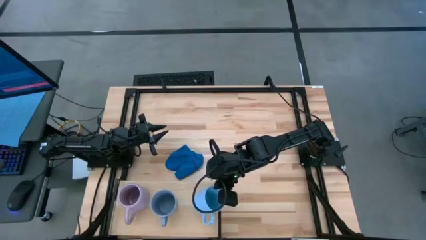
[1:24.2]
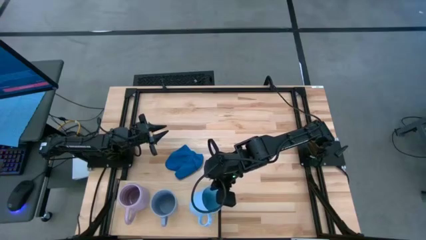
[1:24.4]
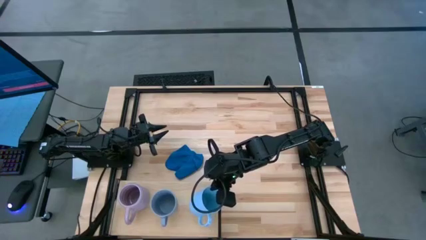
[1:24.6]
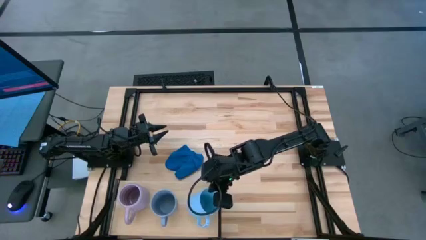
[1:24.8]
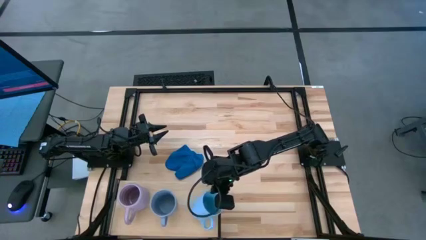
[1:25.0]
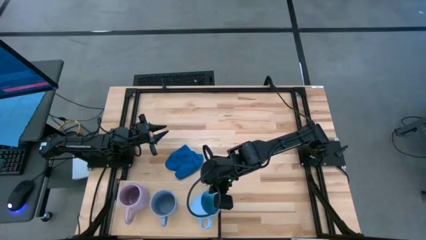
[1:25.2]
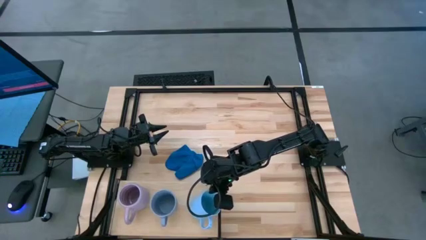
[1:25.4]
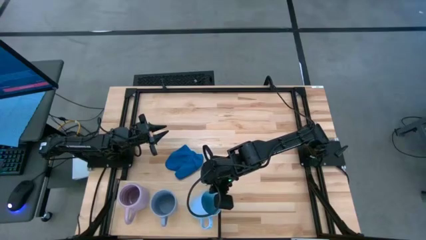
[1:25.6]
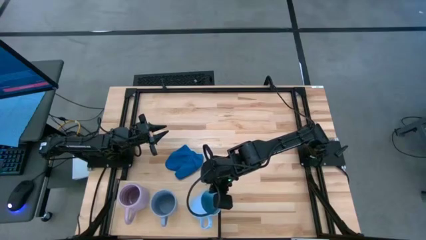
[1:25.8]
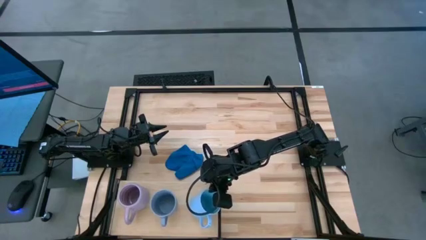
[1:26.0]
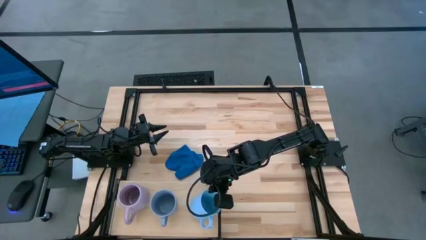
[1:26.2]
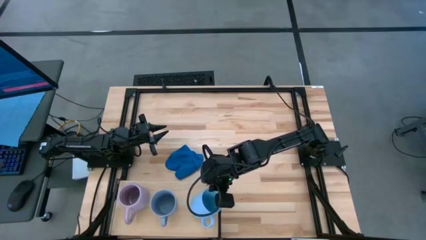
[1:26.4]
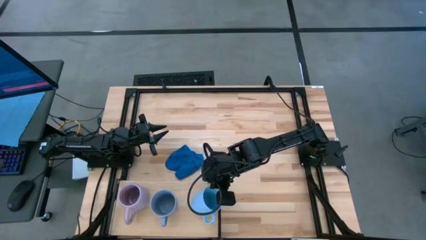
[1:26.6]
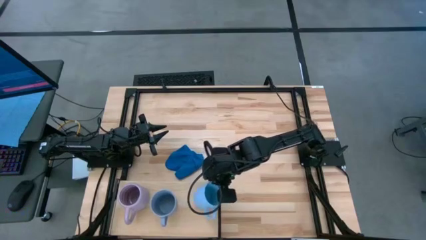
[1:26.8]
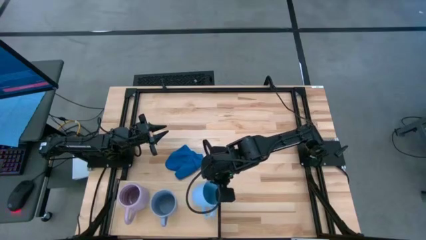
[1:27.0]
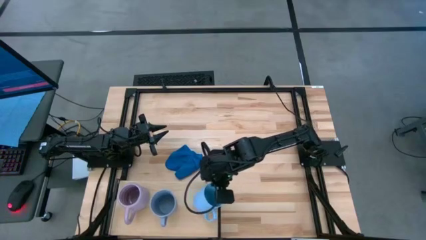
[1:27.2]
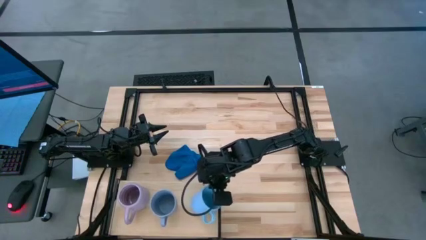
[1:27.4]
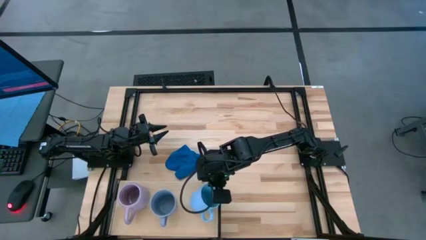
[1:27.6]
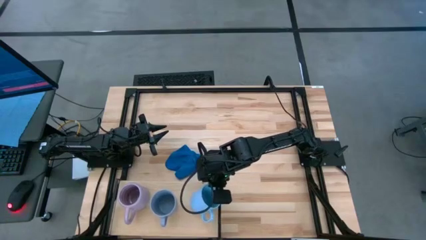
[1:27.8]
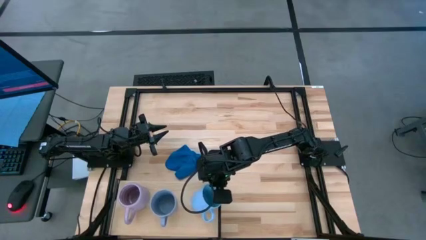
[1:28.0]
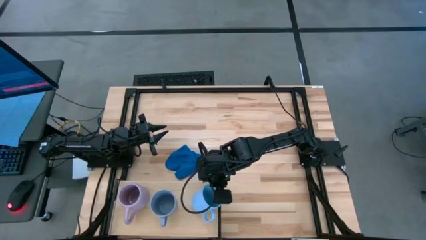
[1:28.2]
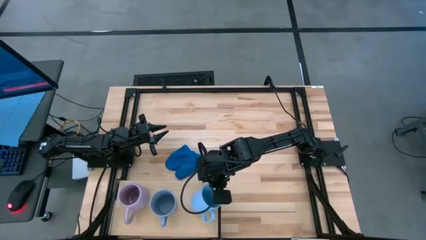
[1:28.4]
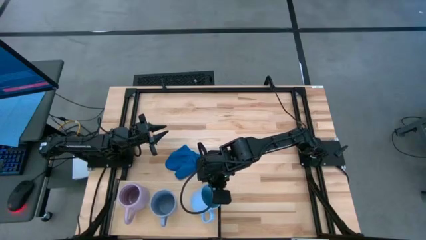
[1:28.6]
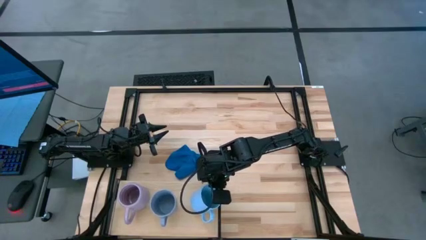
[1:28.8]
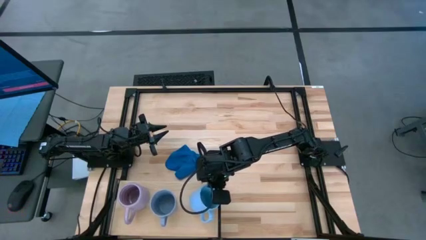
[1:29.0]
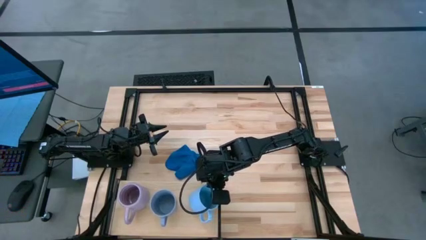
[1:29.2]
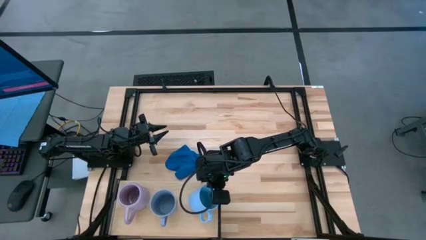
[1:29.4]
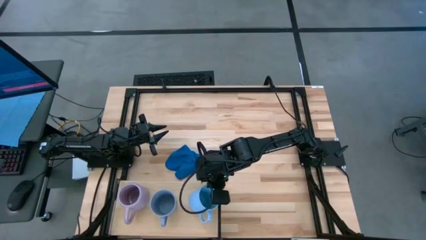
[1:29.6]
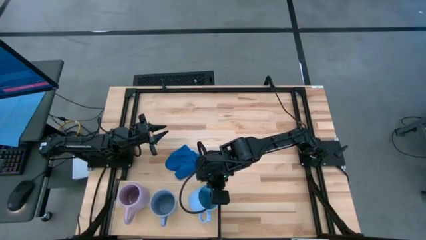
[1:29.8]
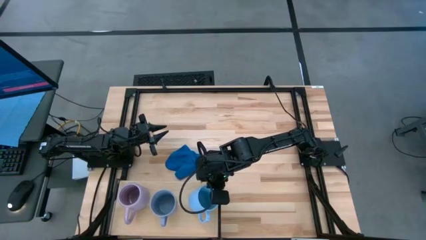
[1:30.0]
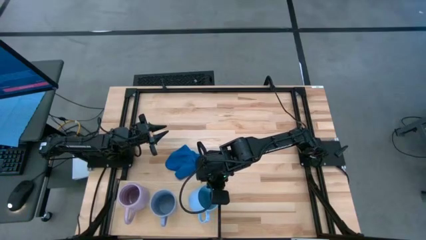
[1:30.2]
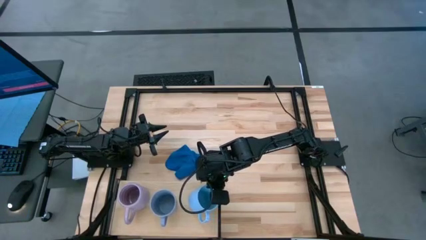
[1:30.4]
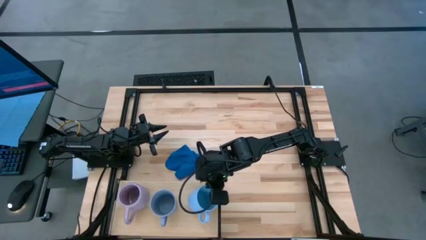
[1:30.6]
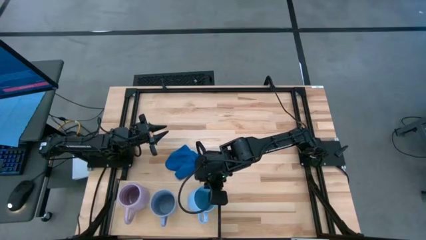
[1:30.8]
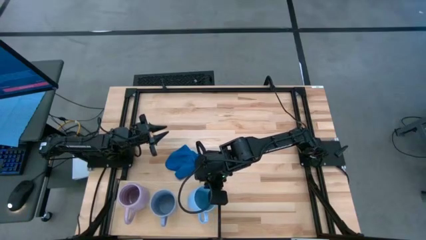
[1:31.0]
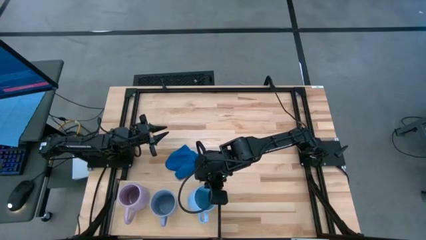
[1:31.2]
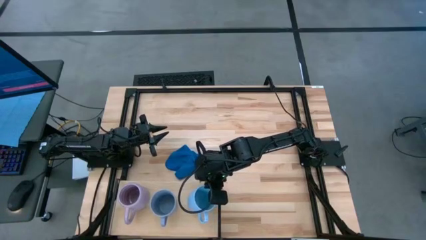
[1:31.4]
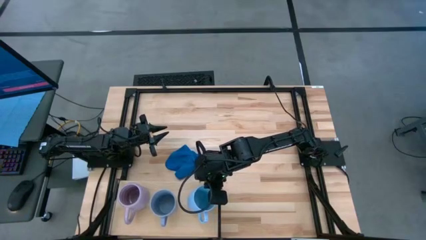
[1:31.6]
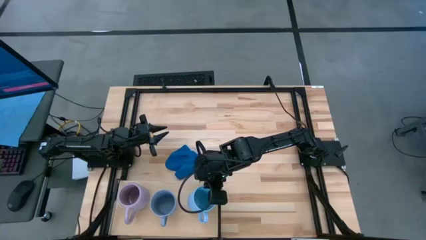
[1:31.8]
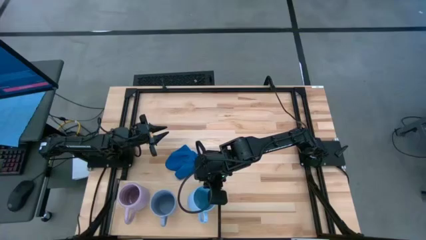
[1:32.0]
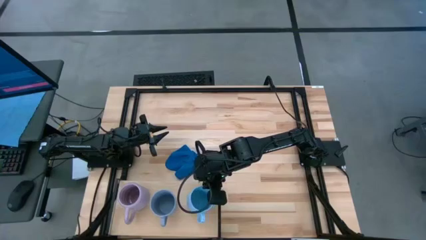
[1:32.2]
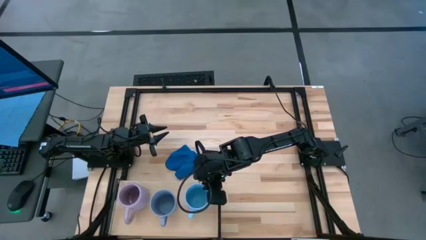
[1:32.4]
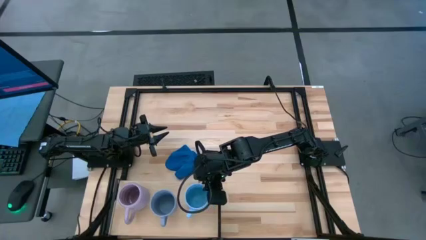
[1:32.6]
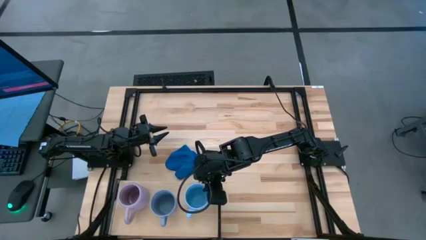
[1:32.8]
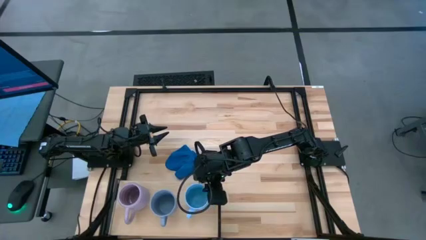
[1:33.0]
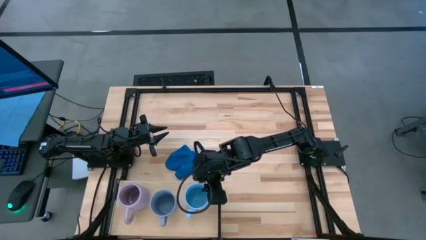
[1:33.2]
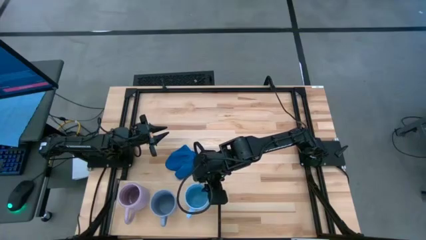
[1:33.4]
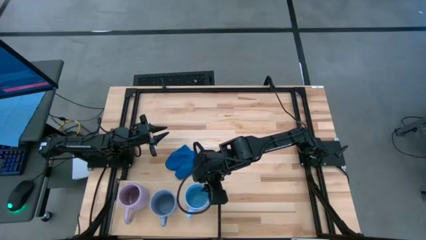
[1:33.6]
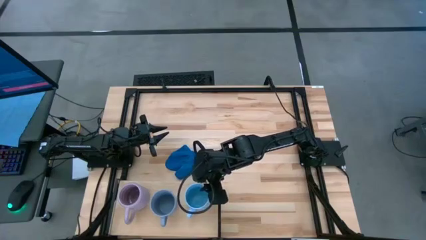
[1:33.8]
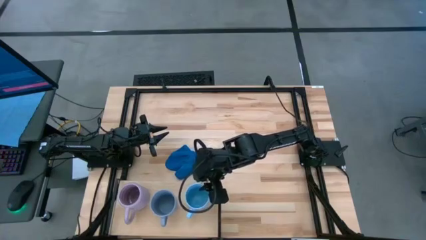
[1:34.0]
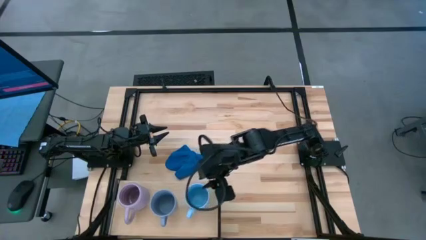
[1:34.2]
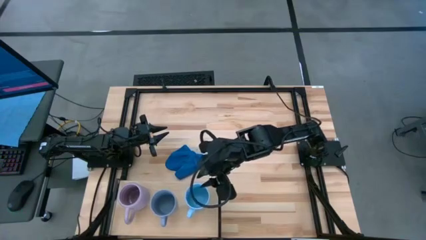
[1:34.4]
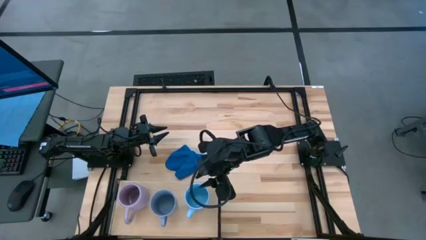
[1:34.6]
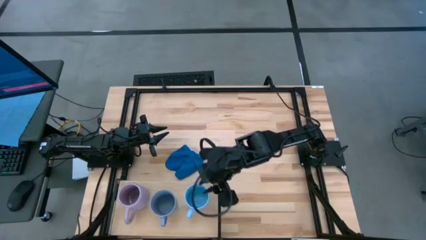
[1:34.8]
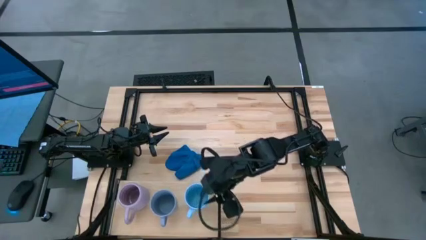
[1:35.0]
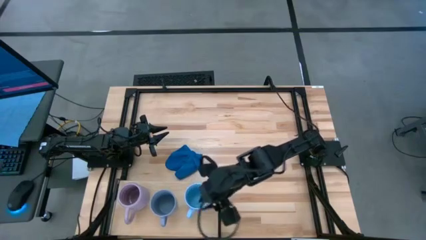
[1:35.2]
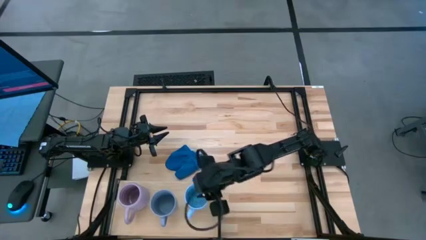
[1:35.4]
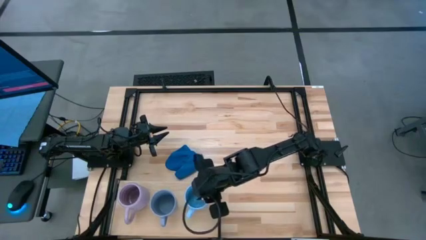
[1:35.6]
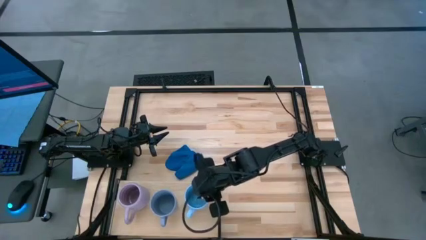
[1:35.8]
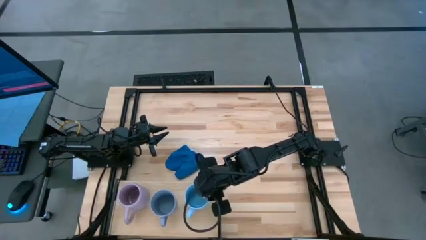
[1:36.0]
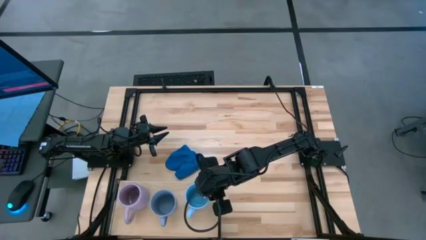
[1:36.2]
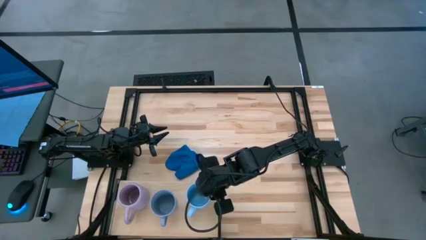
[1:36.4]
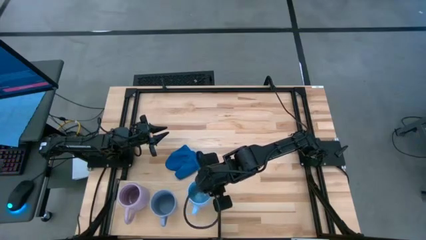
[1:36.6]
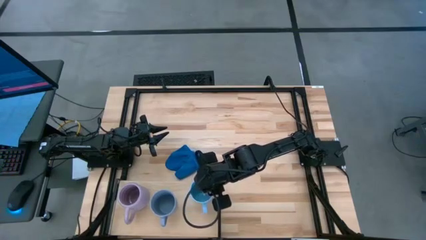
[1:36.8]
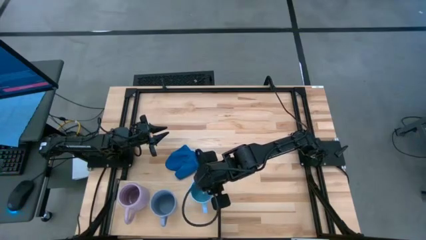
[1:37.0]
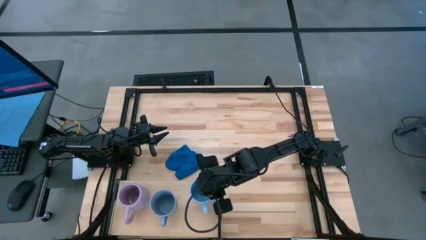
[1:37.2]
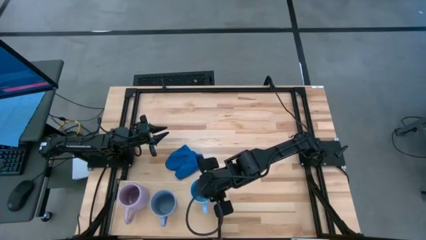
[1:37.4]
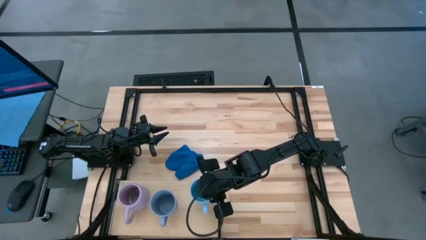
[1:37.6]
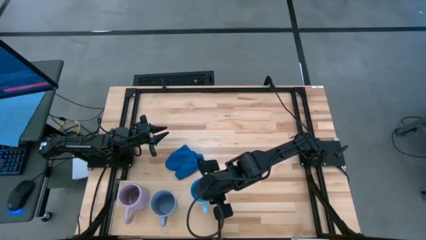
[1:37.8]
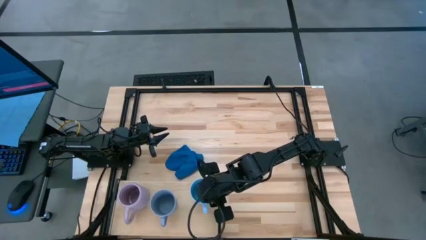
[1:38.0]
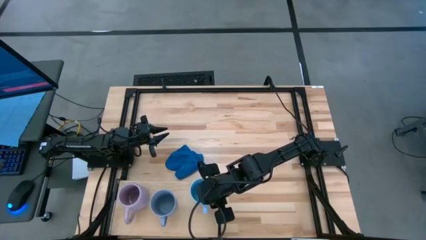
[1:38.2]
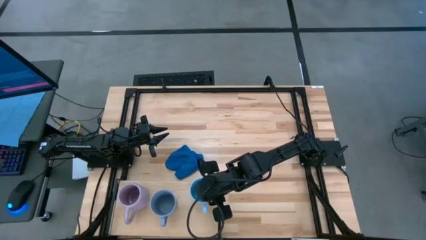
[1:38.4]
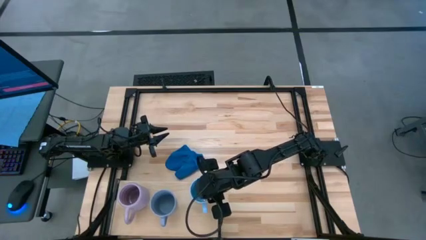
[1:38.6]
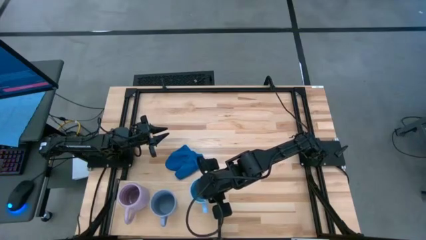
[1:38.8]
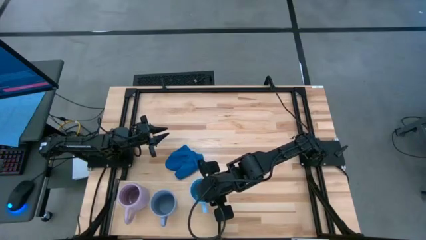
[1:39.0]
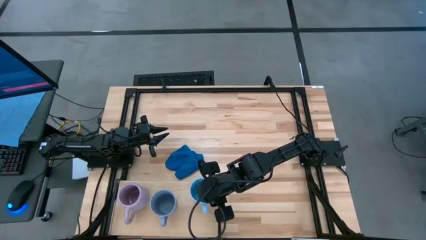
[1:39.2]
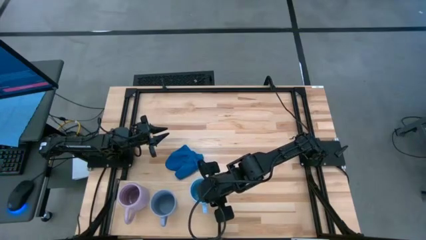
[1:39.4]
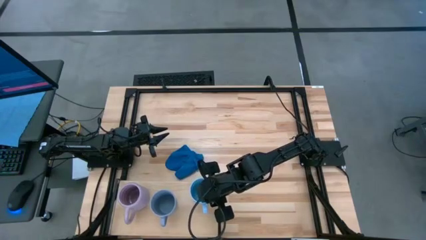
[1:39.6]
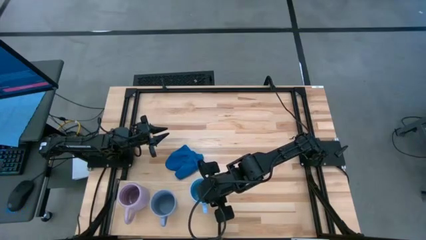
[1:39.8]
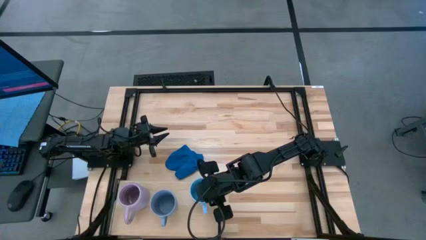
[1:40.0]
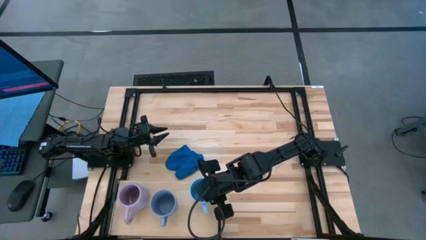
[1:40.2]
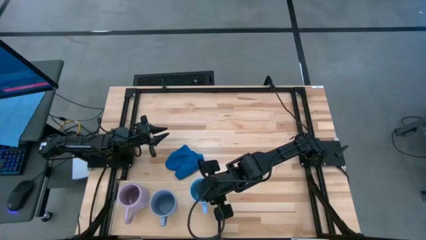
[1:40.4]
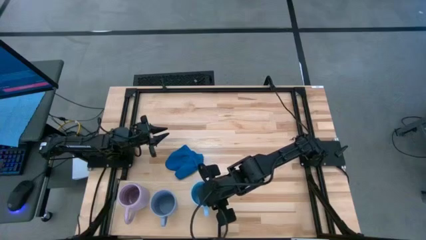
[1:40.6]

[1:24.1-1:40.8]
Task: Stack small to large cups/mugs on shelf
Put the light blue cup on the shelf
